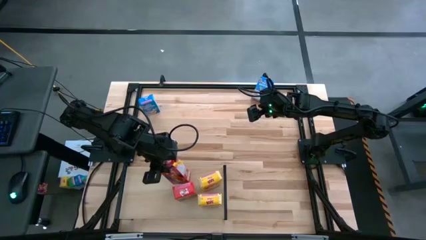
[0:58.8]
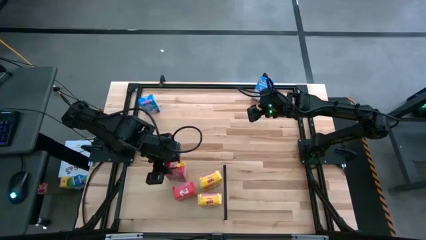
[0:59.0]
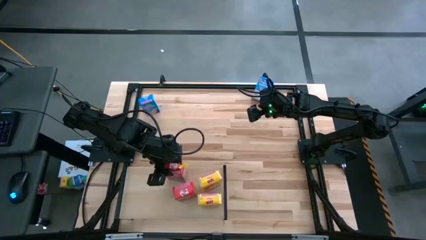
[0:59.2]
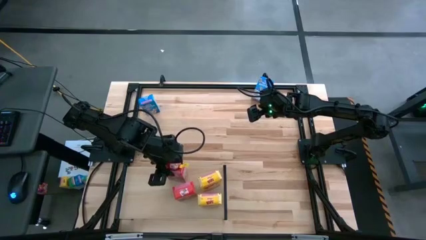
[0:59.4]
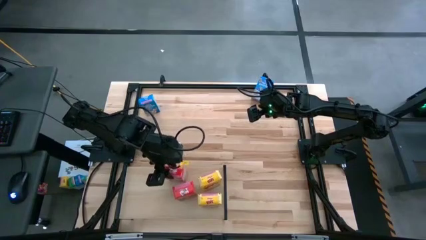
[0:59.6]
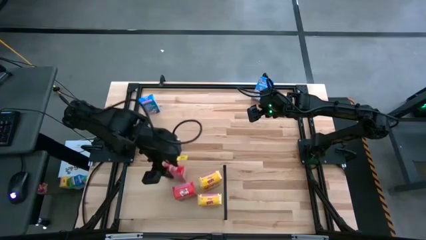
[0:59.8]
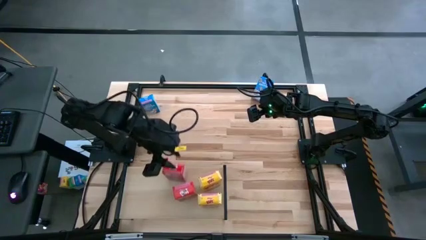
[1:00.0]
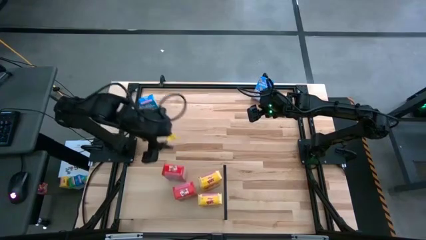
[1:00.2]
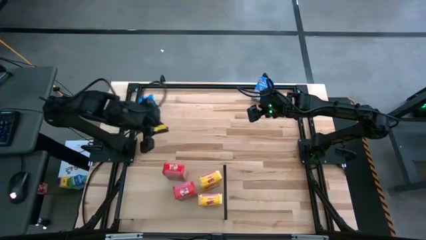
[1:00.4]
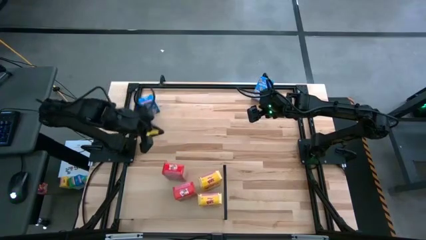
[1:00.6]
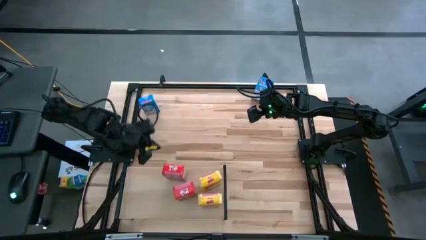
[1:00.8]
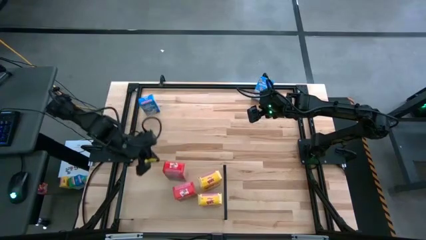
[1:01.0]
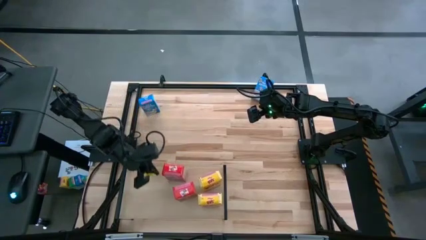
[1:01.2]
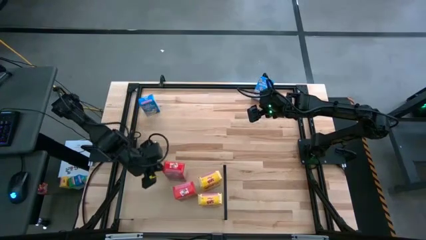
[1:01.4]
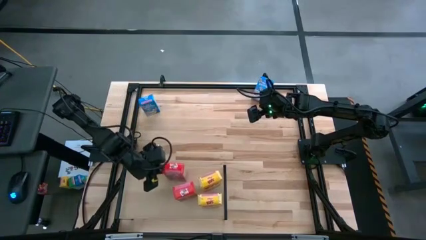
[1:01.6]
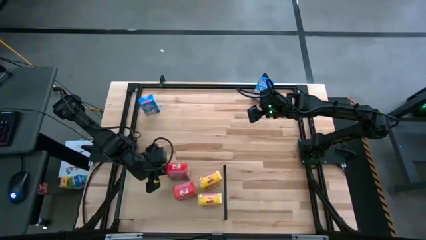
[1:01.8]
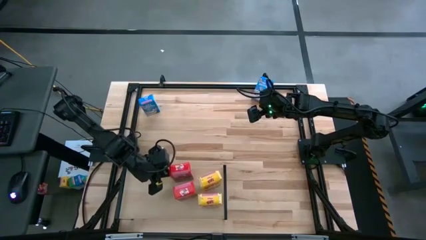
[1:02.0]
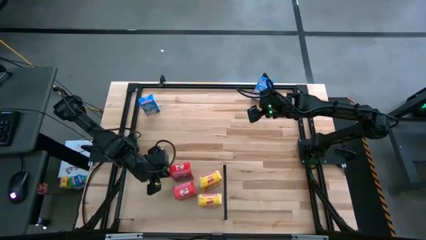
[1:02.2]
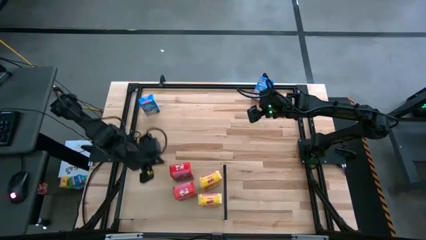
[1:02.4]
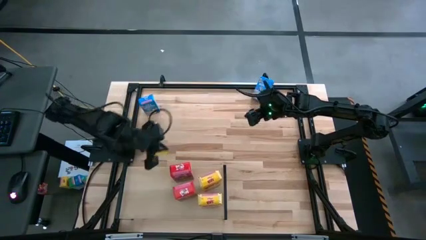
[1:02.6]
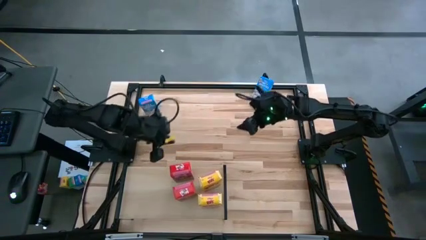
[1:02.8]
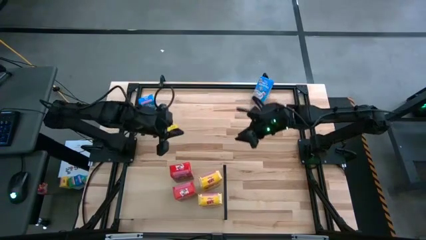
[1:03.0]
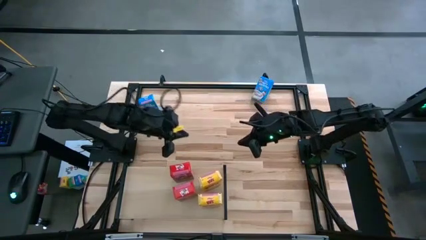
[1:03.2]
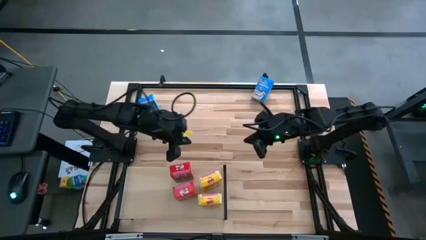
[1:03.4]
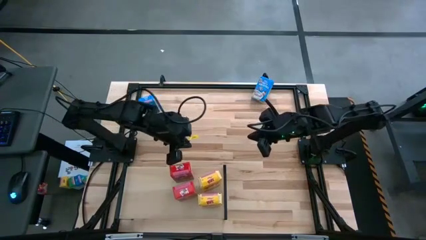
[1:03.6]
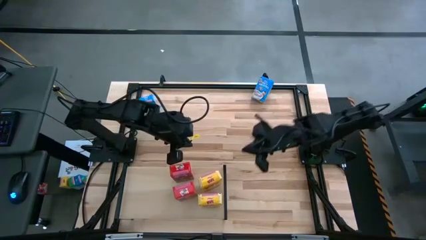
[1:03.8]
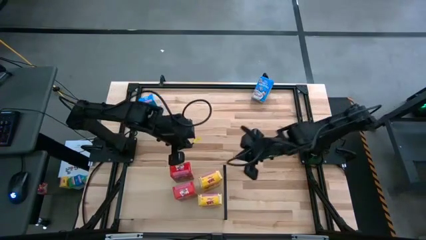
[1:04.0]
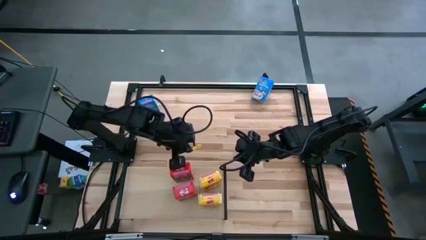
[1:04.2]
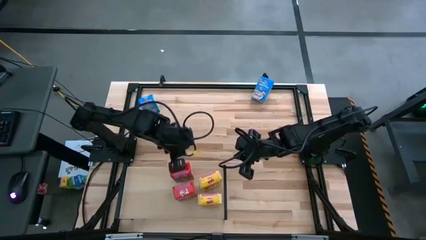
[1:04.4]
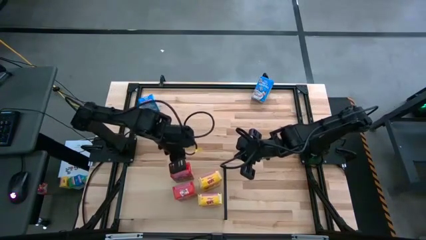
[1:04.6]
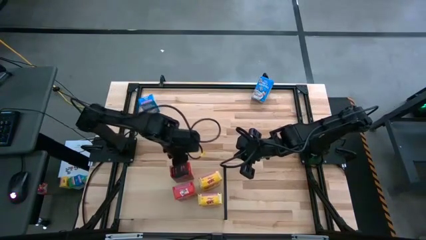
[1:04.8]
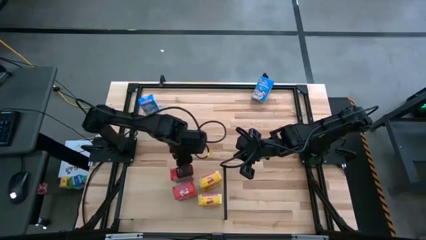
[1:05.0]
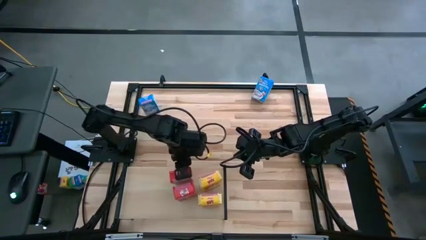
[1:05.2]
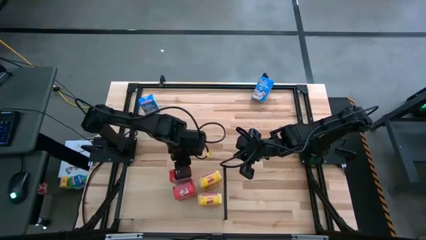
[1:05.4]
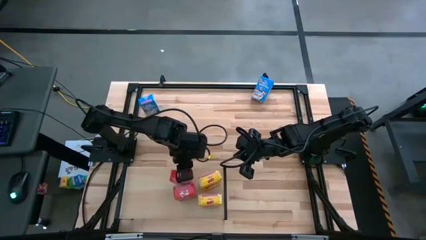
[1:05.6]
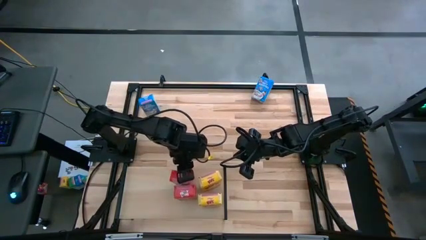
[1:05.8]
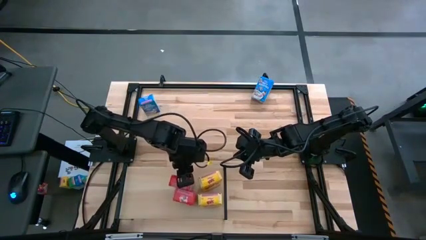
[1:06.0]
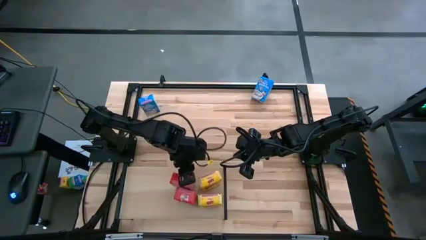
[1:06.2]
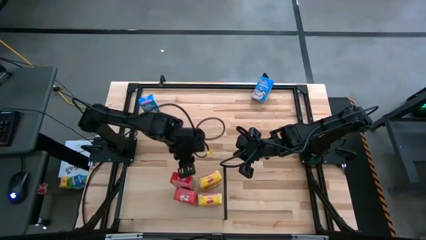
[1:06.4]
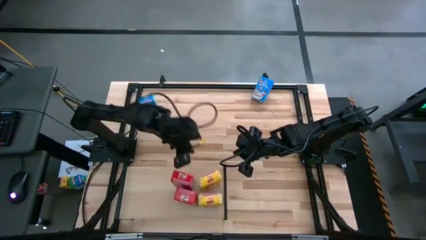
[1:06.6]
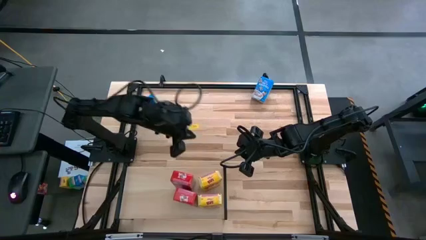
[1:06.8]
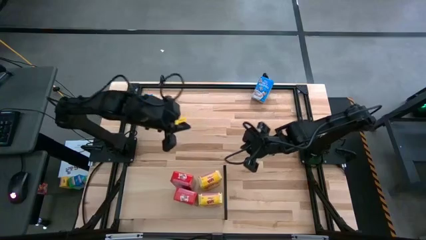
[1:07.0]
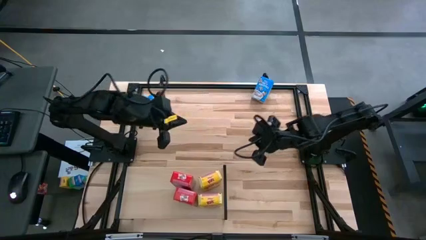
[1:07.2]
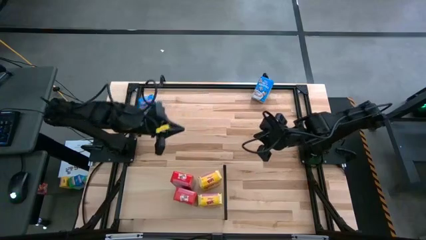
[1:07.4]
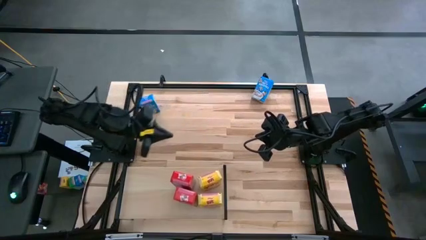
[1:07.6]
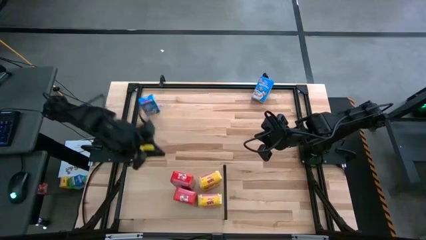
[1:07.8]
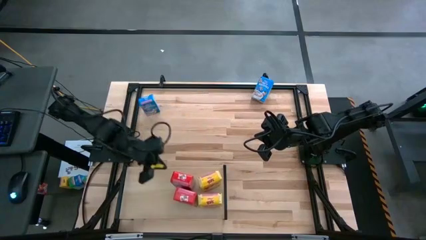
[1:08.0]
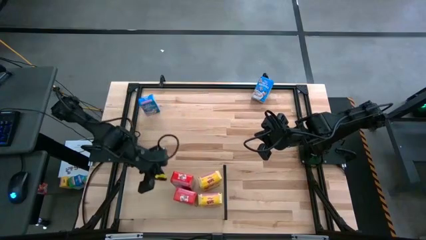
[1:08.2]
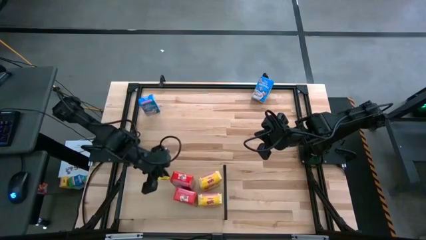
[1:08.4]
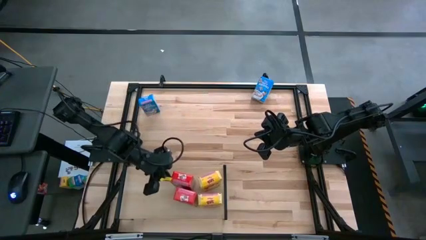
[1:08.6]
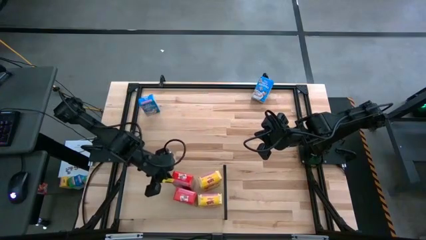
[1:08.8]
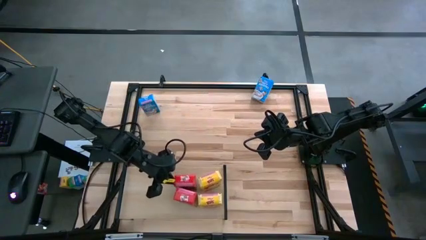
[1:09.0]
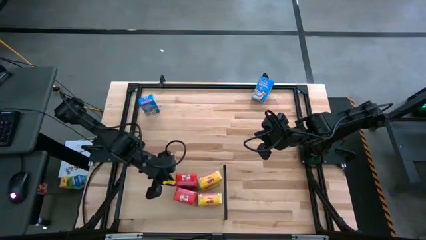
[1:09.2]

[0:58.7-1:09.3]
Task: Stack cereal on shelf
Put the red cereal box on the shelf aligned with the red cereal box

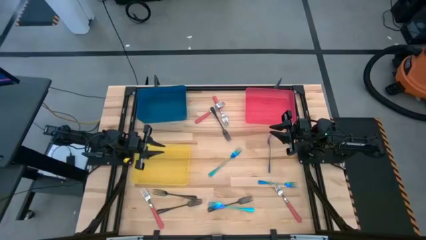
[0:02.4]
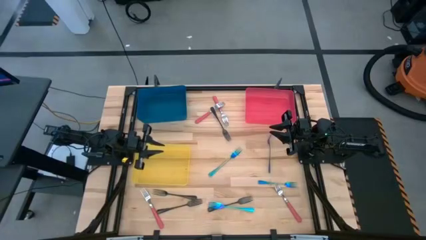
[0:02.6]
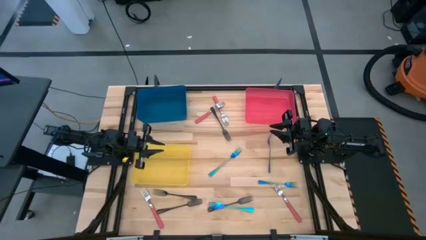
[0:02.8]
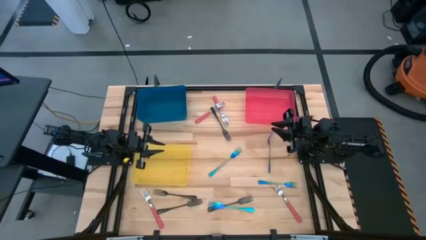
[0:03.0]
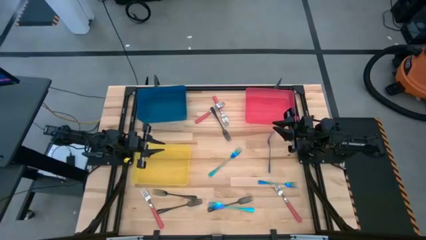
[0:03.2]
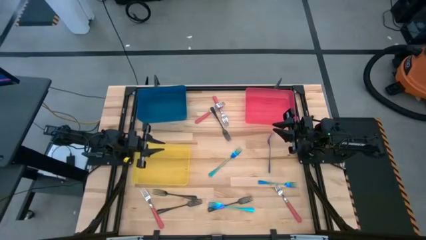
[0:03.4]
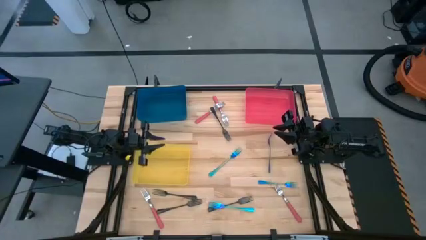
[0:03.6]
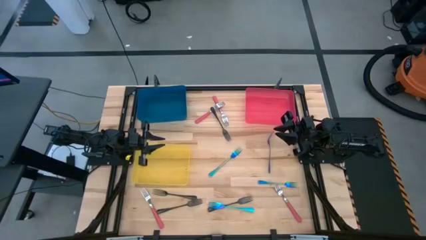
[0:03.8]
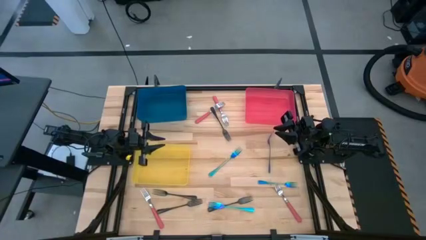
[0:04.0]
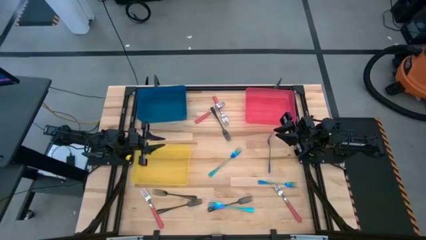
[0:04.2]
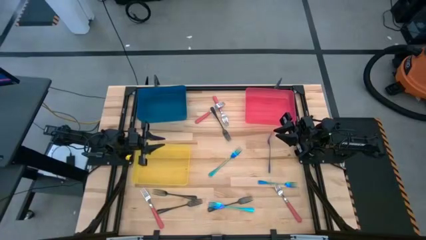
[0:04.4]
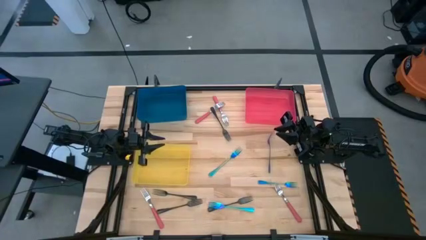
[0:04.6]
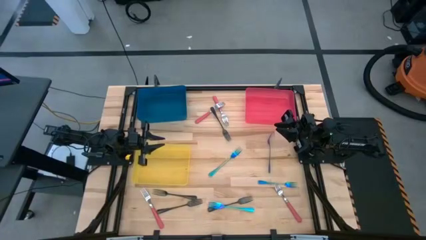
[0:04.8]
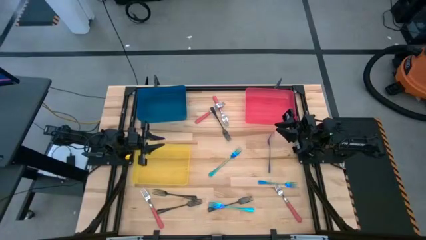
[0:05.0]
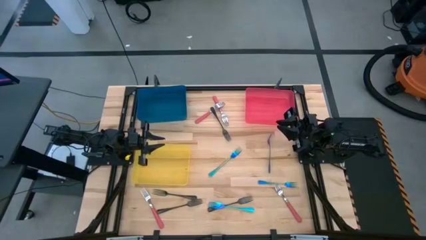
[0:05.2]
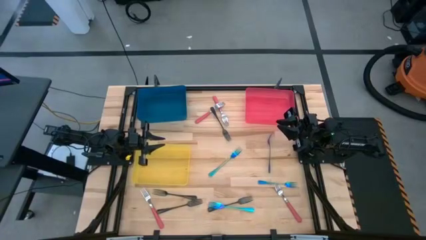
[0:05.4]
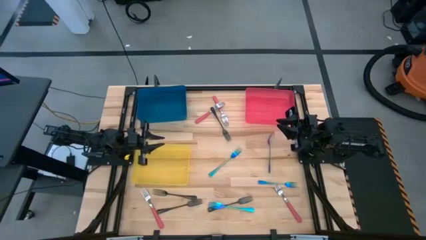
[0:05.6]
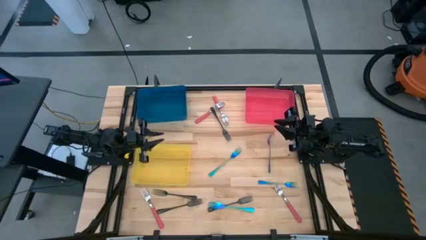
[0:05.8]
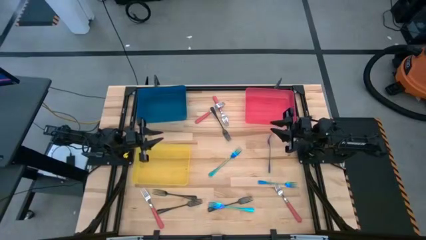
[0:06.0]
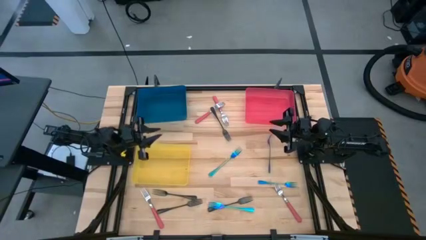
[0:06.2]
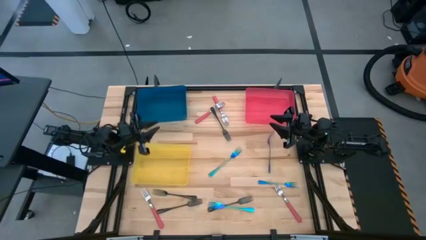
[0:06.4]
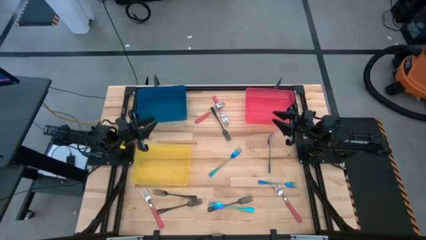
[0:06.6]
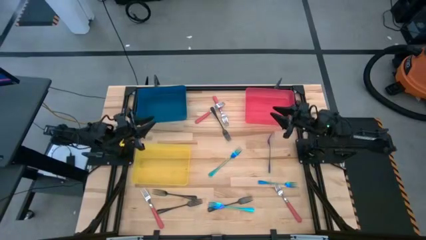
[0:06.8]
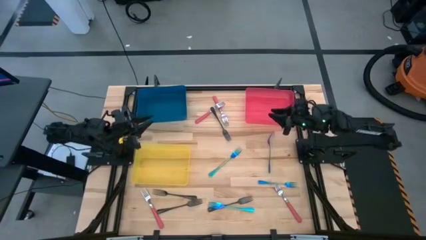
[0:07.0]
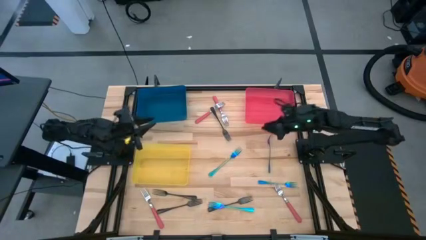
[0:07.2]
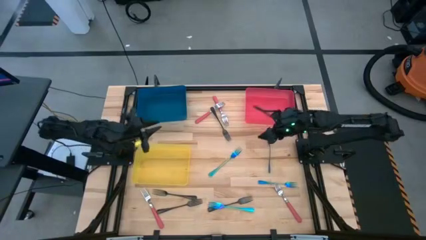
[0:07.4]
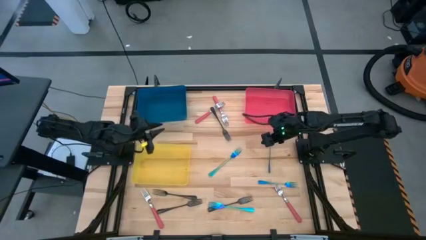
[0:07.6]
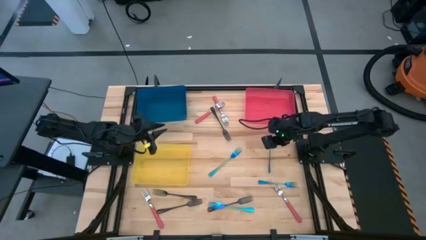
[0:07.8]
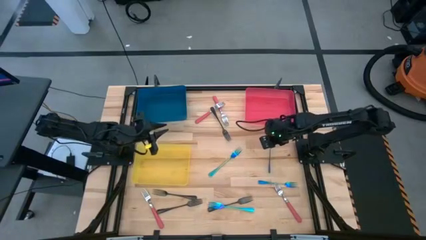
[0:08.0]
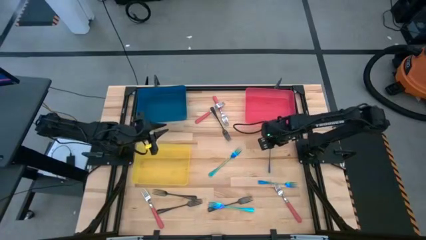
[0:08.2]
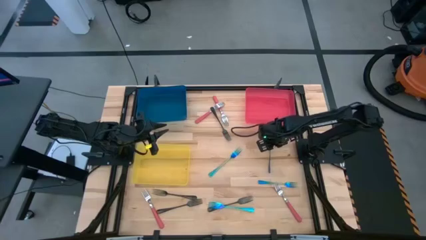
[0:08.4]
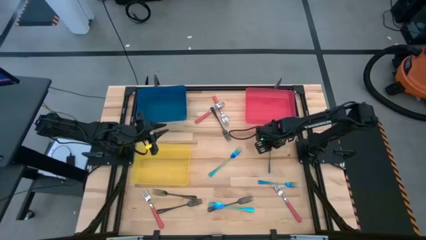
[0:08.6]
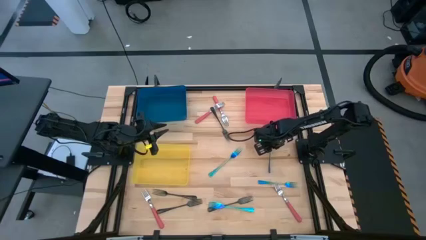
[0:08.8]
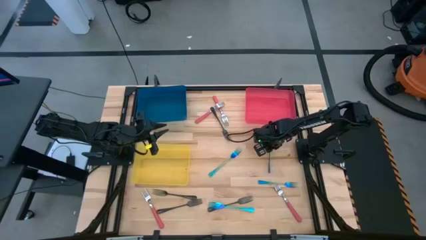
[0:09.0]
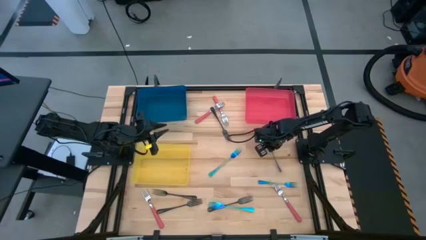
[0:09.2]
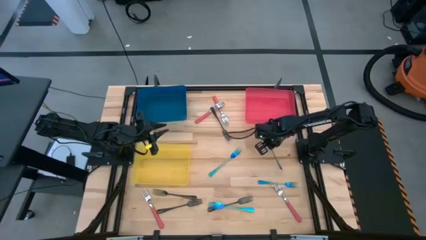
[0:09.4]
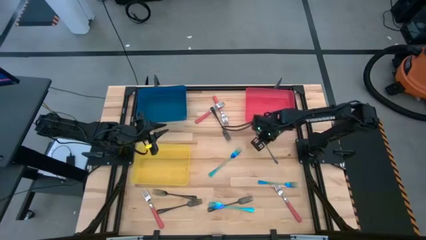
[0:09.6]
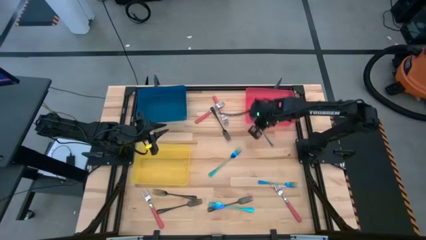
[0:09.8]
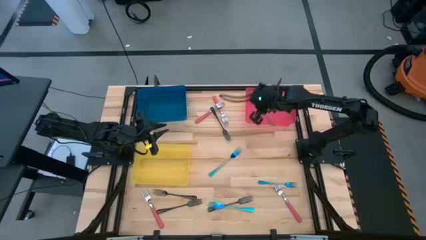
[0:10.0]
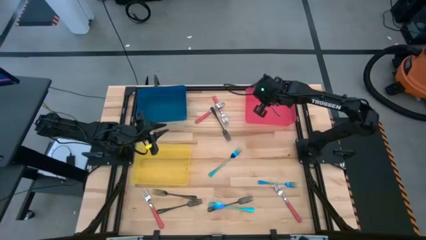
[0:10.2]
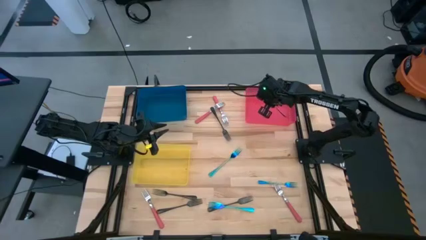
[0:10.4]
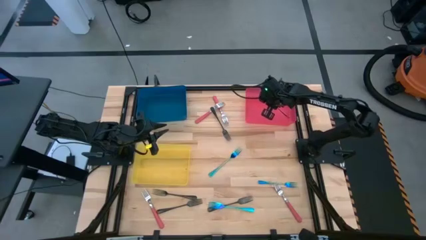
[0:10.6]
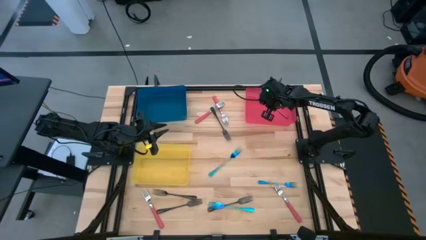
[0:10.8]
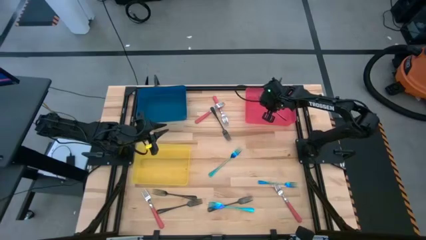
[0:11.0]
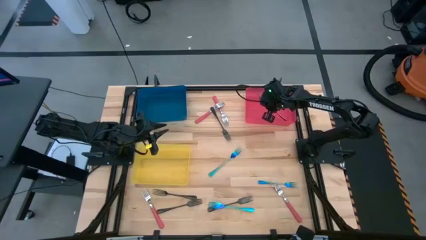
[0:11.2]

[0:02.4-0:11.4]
Task: Sort silverware by color (type)
Put the top right blue fork into the red bin
